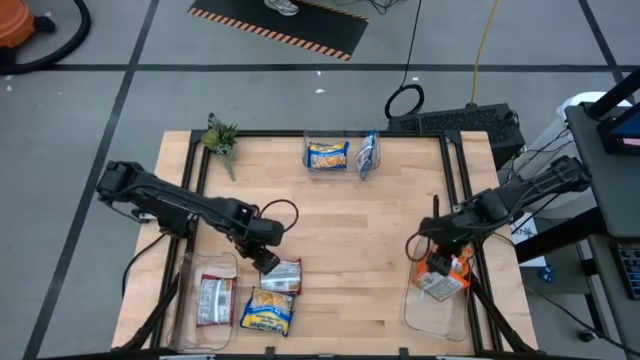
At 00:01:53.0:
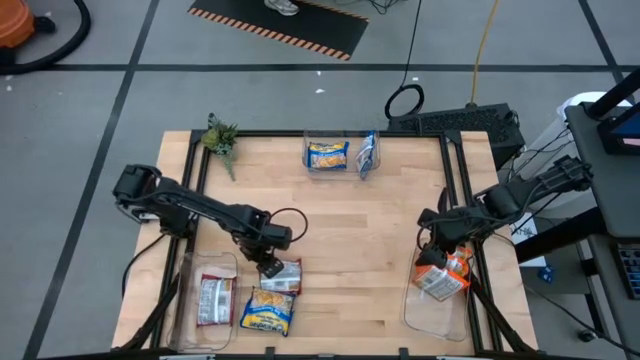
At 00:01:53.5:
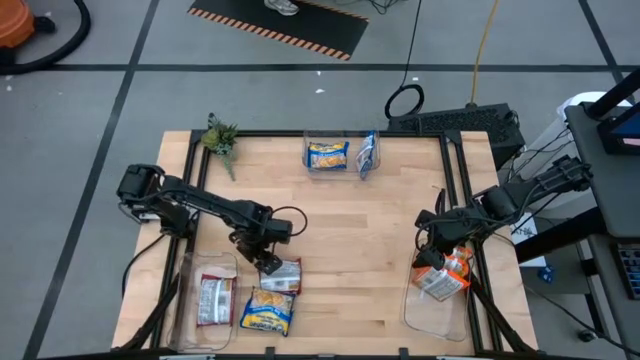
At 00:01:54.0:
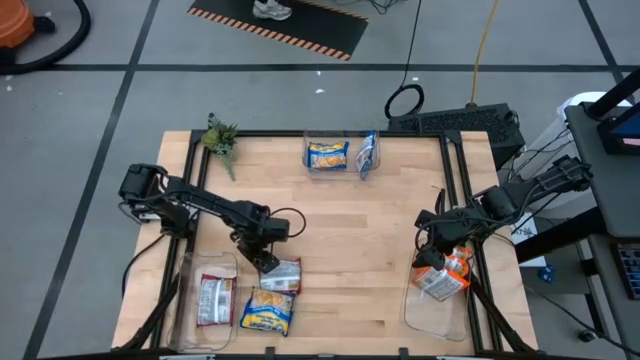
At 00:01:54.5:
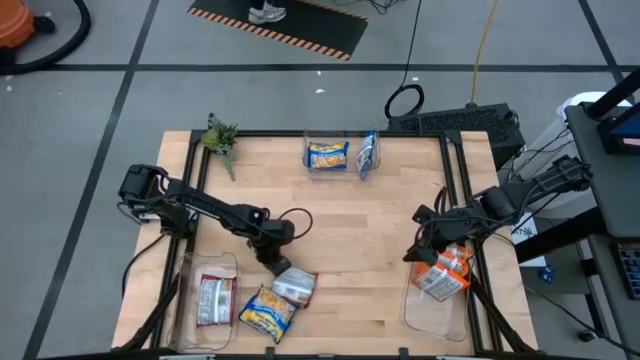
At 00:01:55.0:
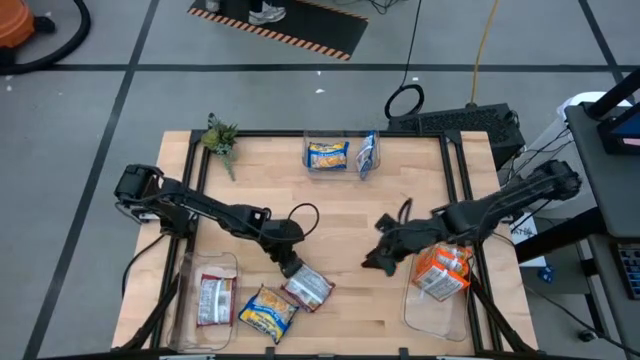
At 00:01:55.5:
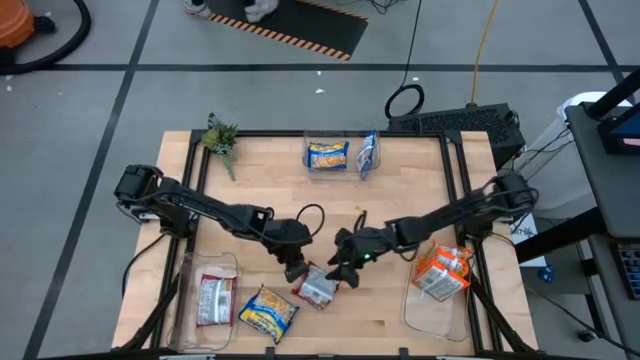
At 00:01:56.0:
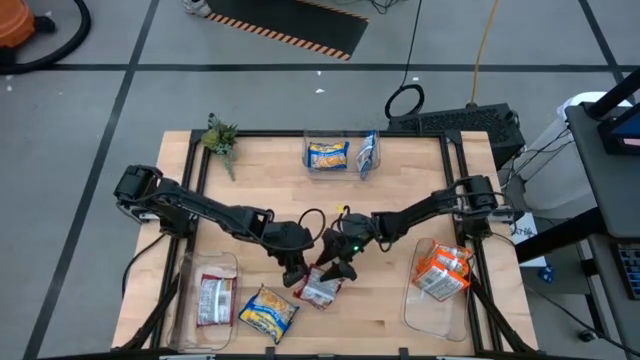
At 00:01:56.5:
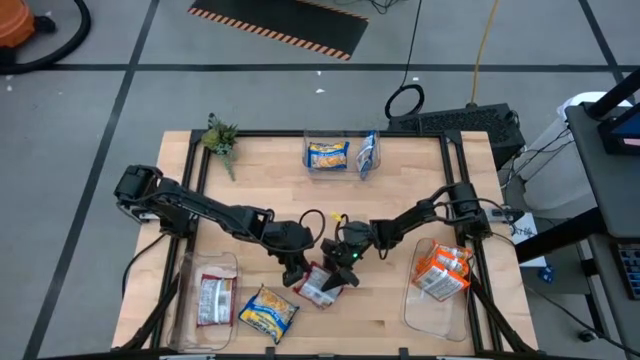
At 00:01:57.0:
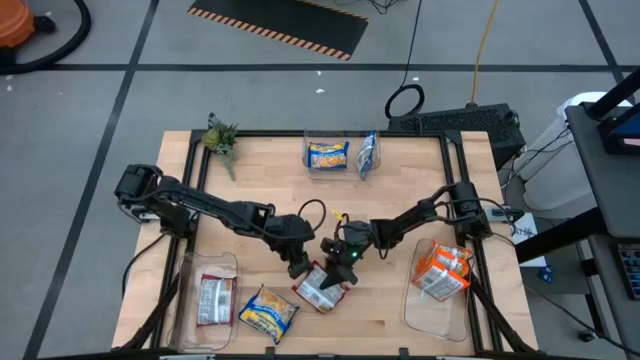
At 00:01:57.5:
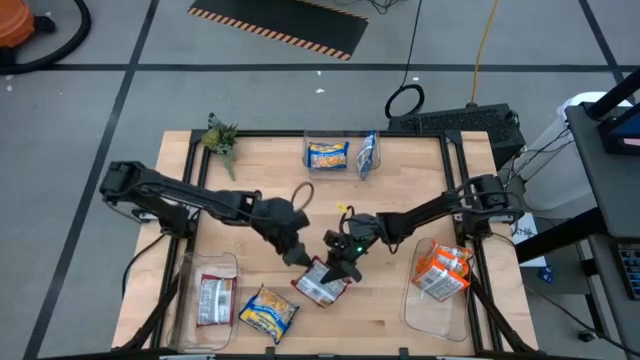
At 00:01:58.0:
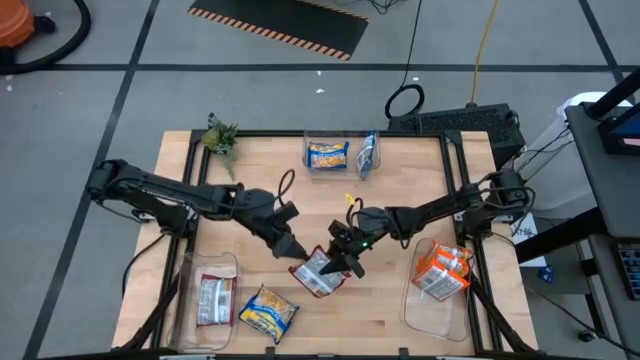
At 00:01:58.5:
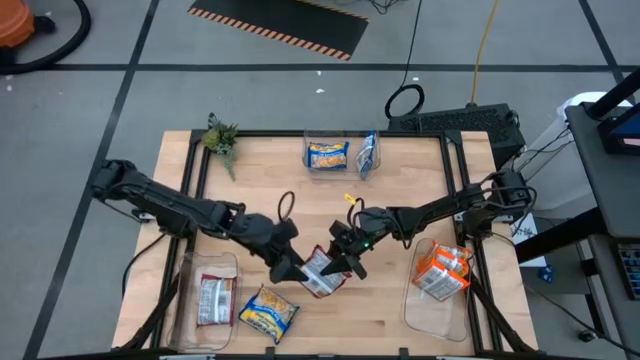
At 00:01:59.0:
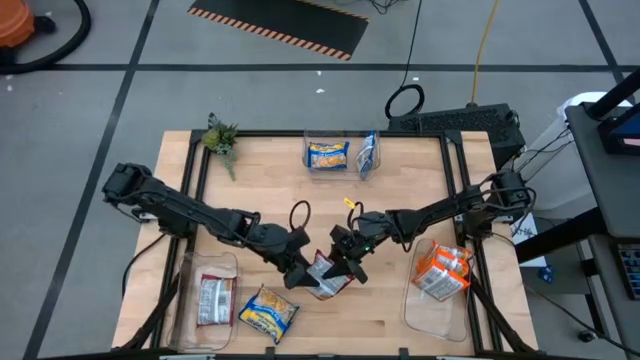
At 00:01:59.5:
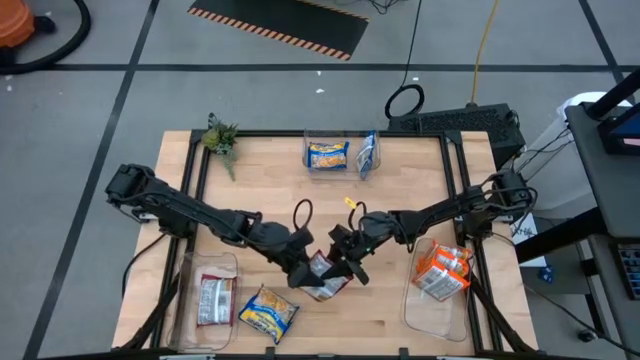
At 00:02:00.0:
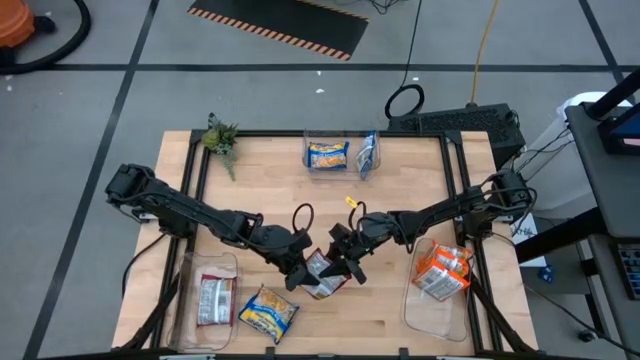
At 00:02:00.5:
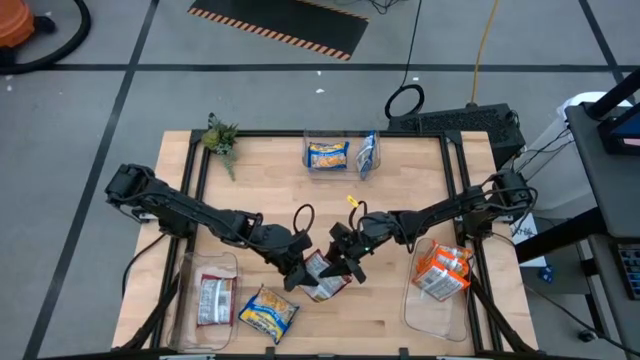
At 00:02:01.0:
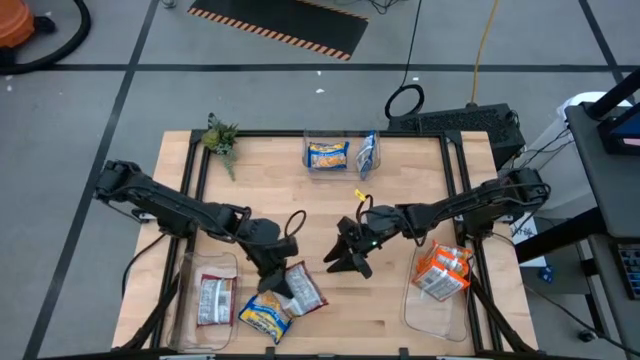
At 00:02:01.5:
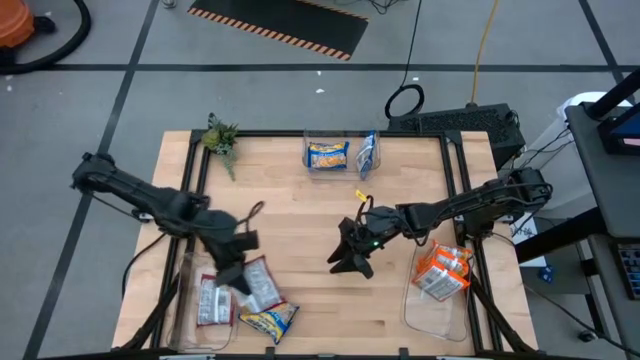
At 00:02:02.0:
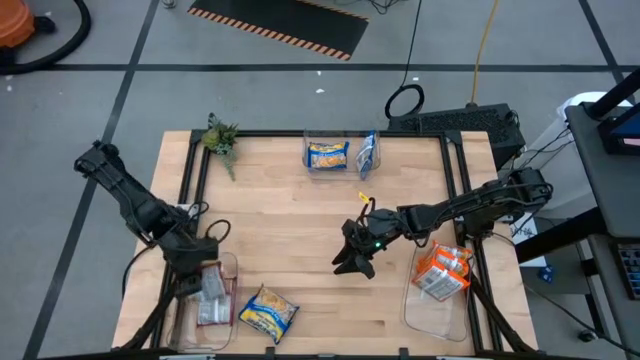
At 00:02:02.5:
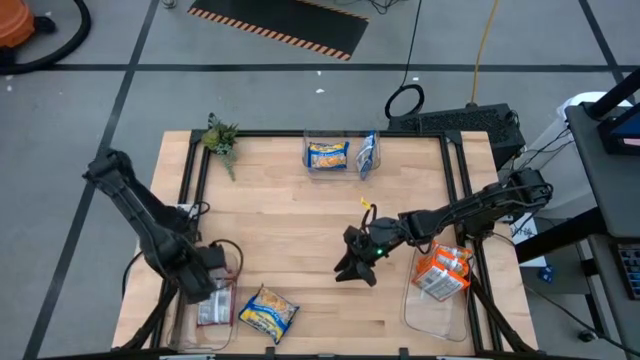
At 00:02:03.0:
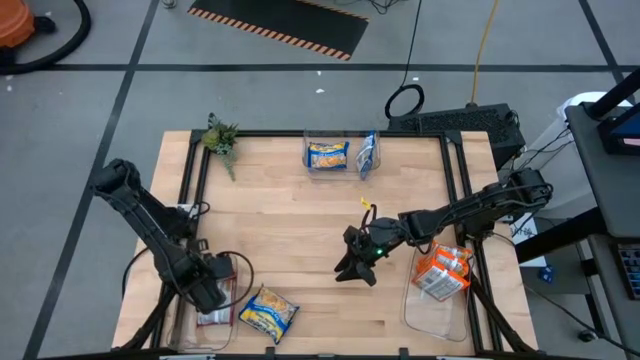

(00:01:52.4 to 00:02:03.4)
Task: Sort Maruchan noodles
Put the red noodle pack into the bottom left transparent bin

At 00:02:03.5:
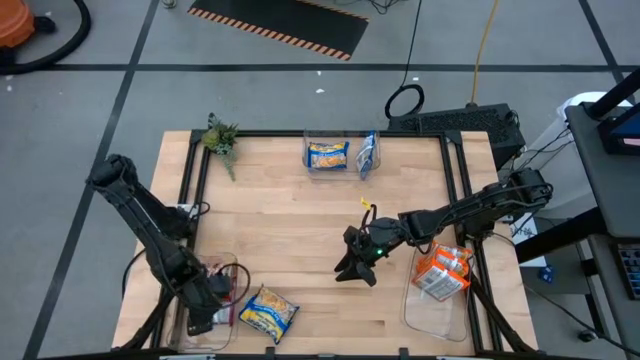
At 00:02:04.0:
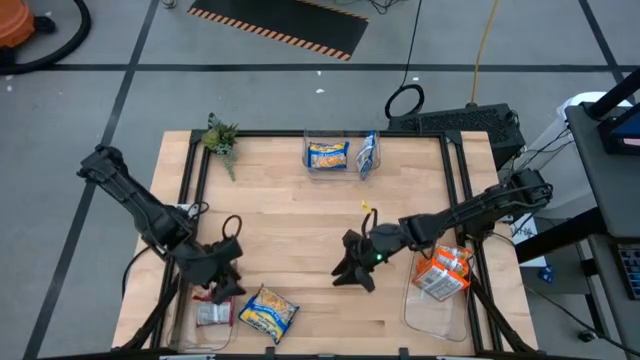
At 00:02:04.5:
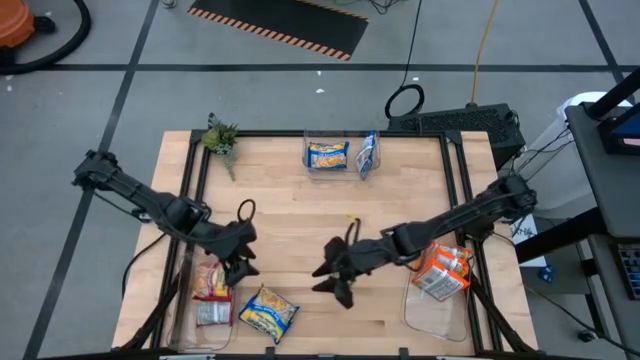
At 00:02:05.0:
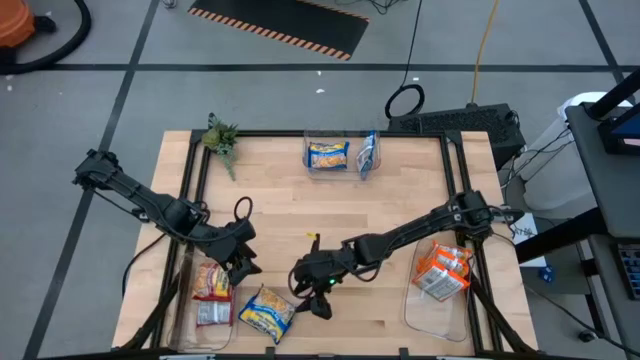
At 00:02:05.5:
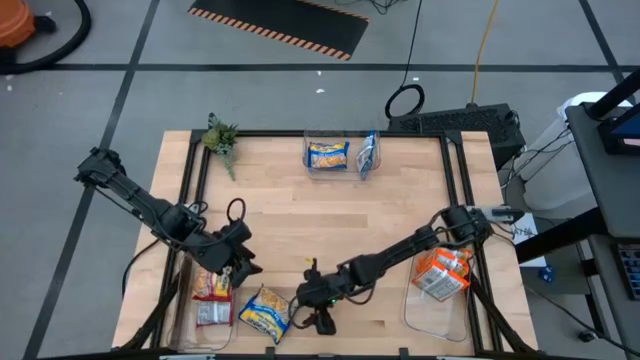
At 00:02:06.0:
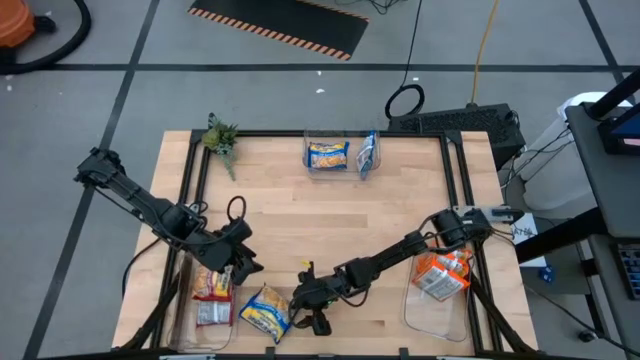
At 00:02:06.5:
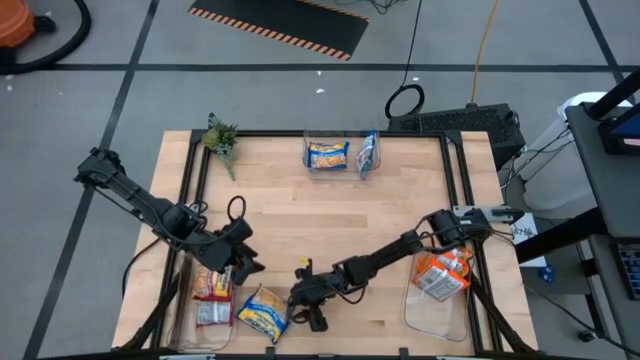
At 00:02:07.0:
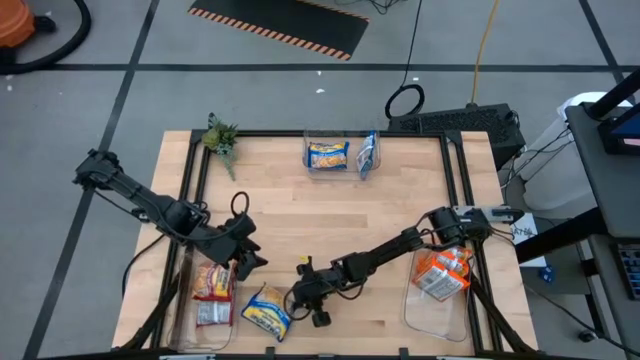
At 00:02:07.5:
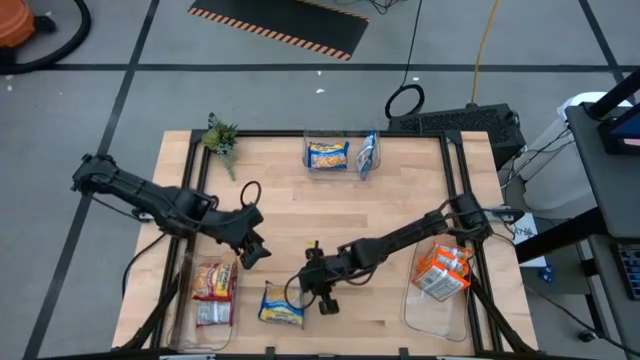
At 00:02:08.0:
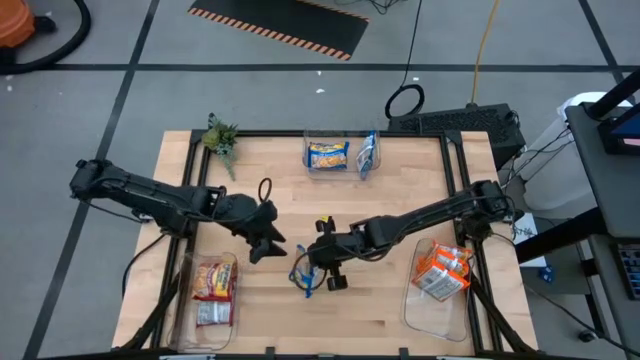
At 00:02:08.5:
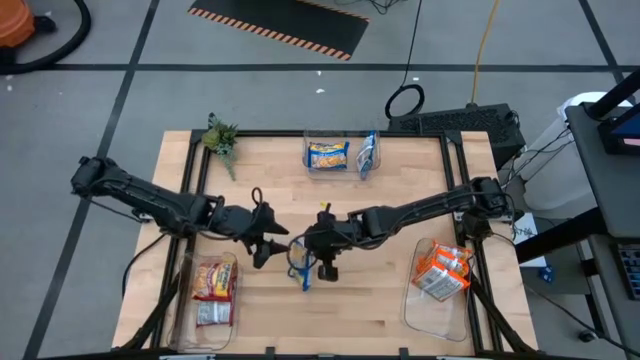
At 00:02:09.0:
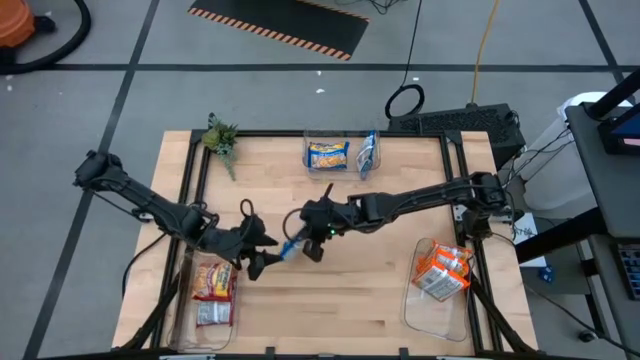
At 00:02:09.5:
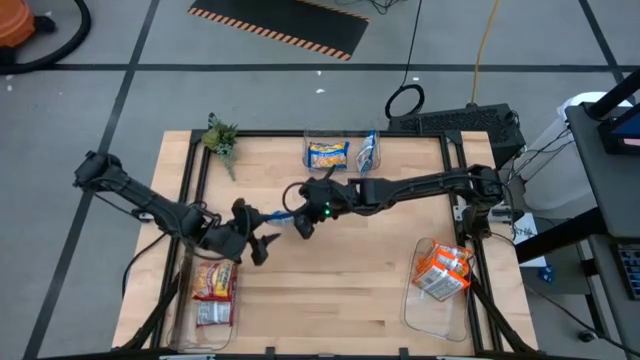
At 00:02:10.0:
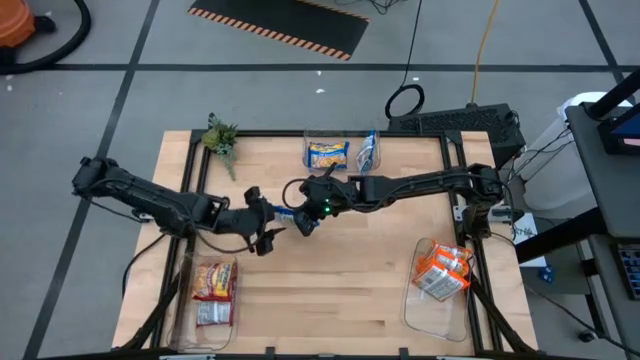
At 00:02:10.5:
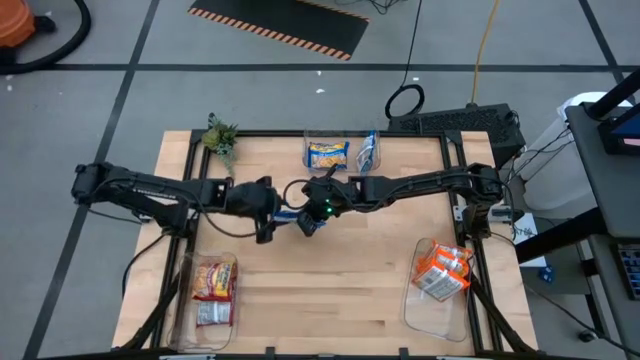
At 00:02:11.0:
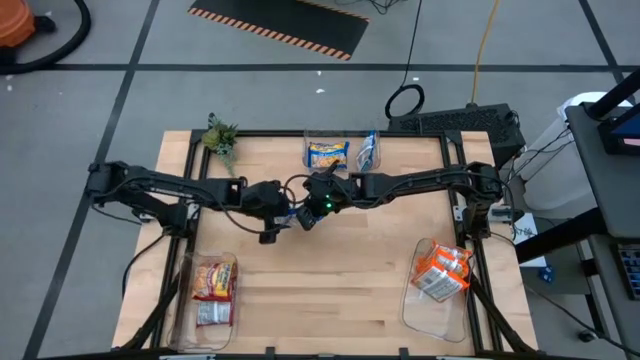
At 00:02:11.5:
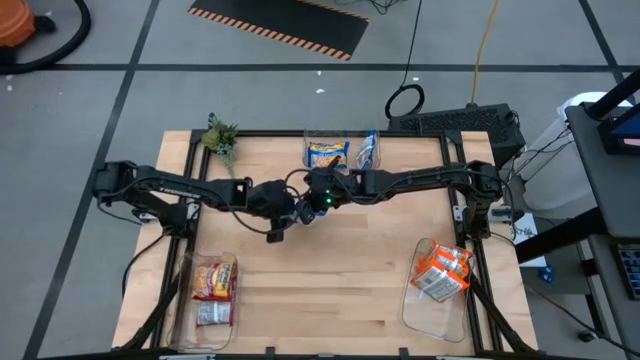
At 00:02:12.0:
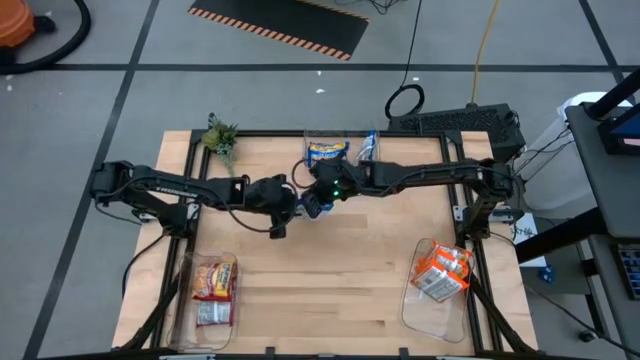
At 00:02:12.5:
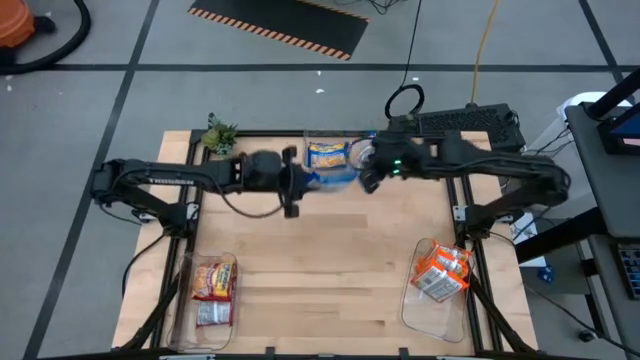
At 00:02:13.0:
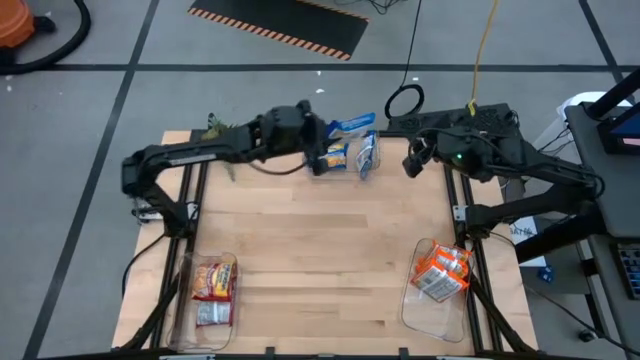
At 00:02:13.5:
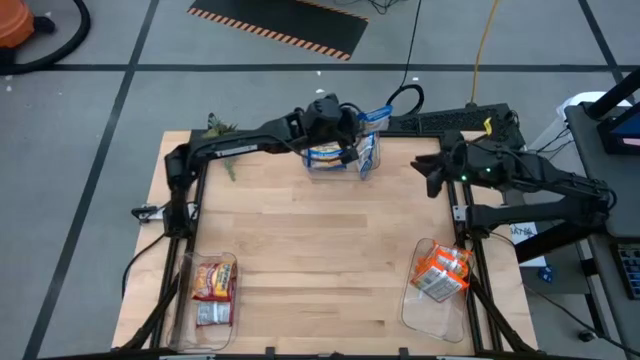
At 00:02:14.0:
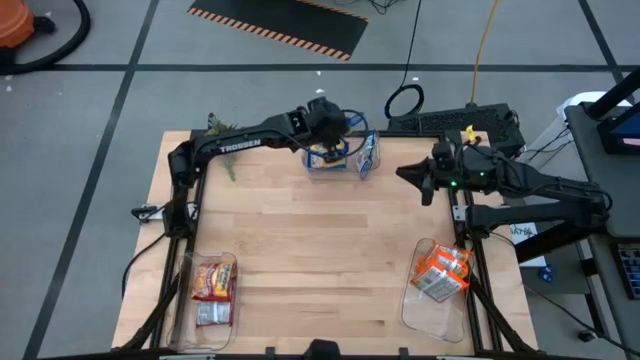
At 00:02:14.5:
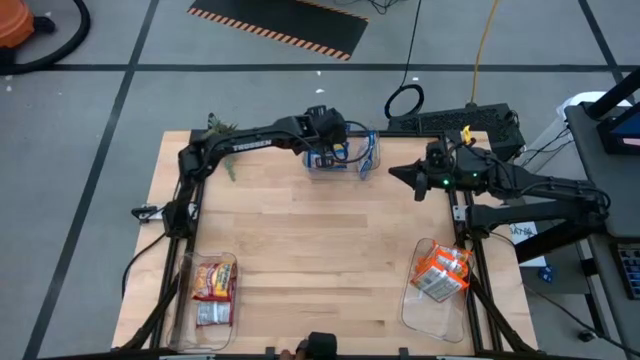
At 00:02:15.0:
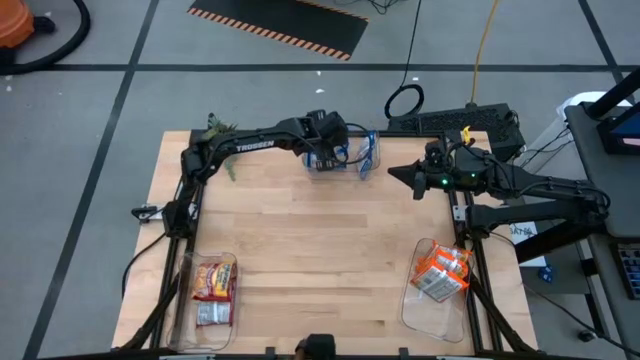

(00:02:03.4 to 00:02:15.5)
Put the blue noodle pack into the top transparent bin
